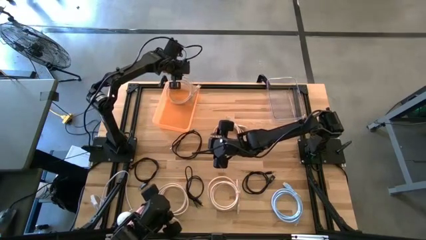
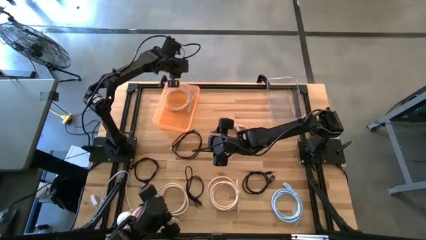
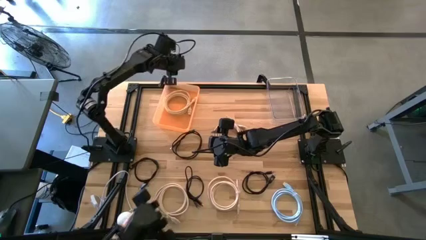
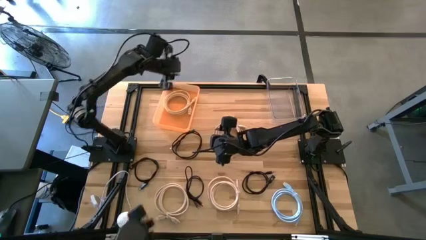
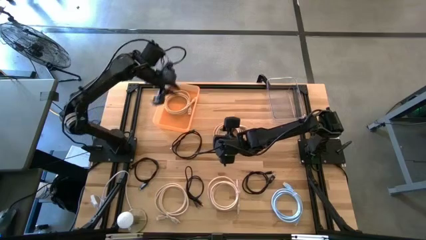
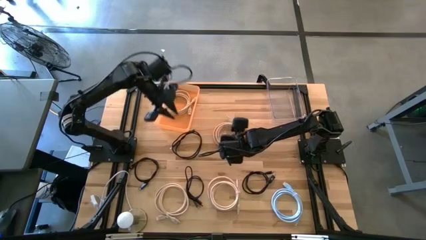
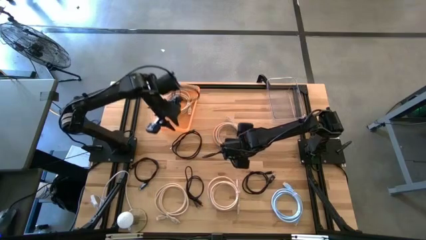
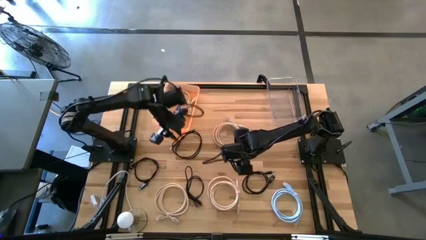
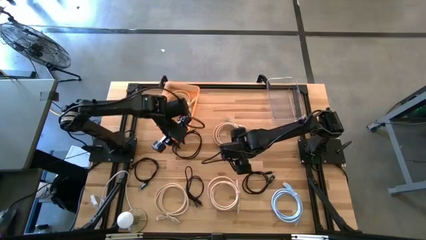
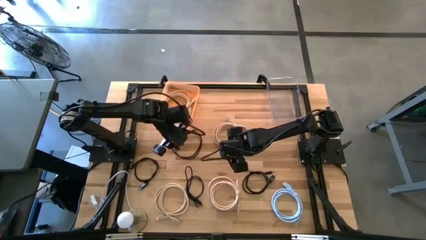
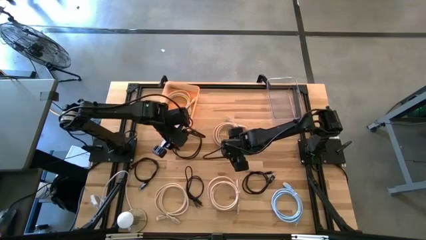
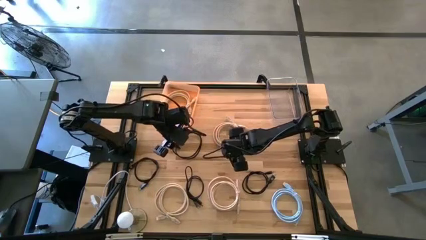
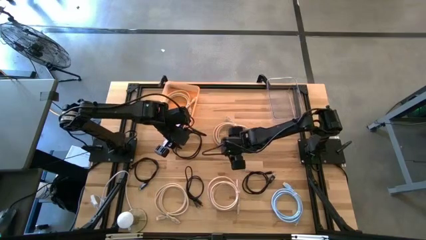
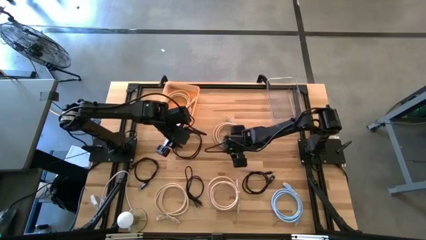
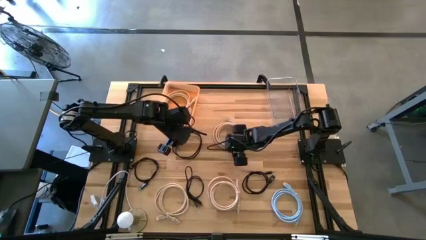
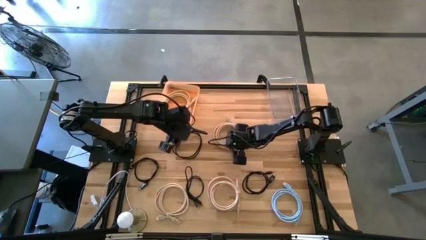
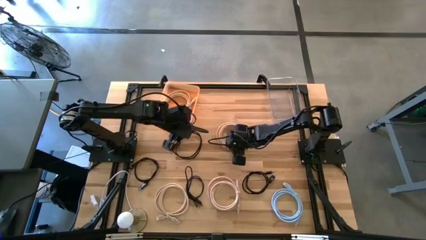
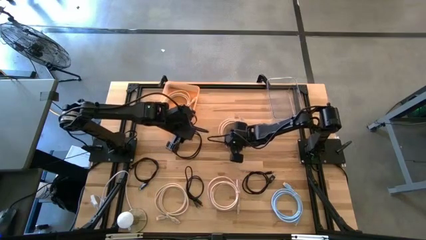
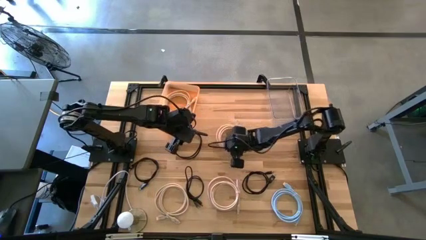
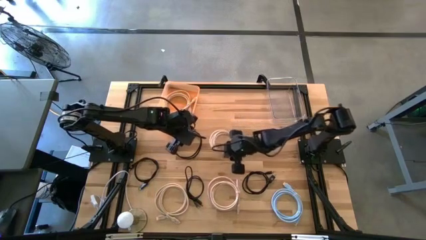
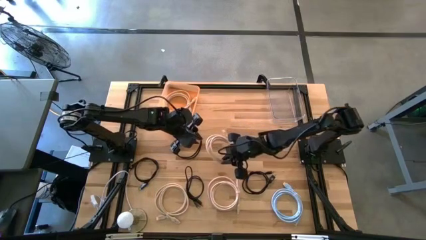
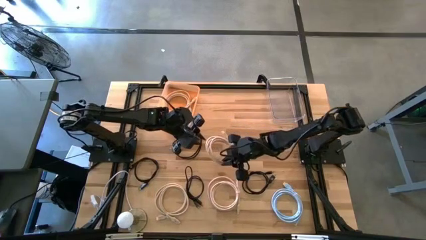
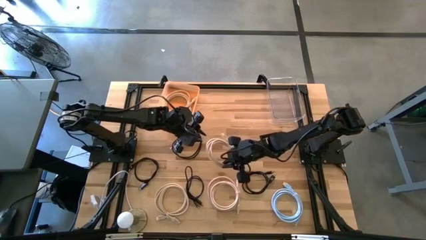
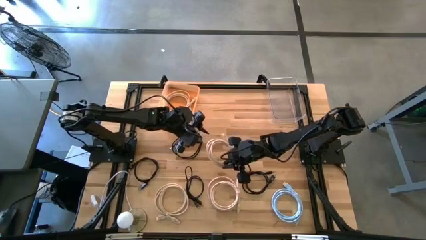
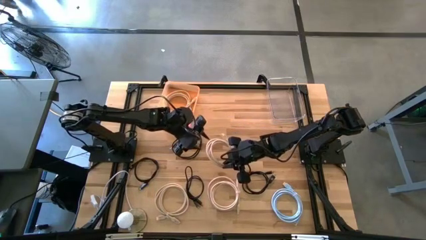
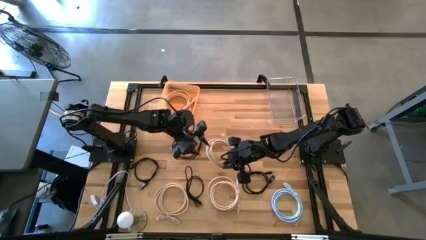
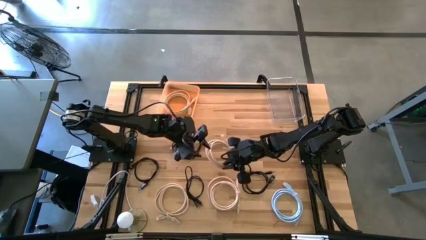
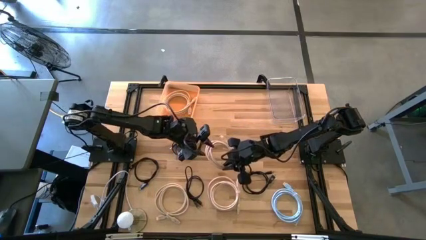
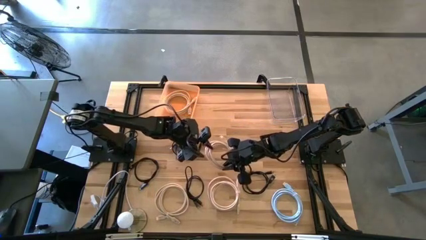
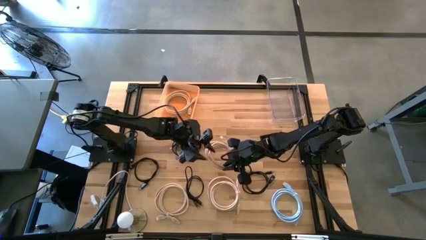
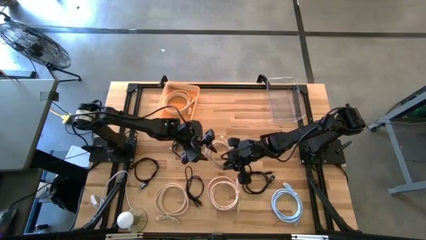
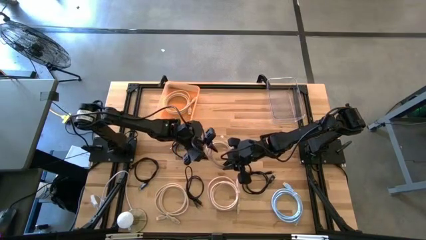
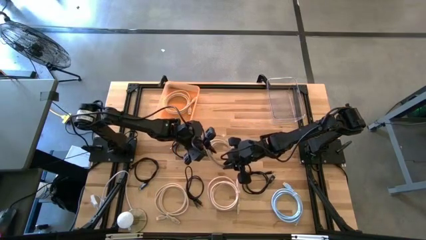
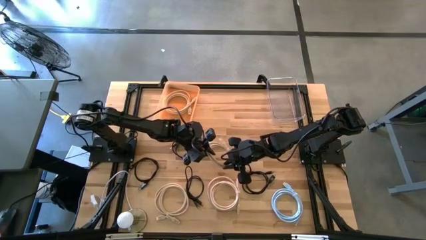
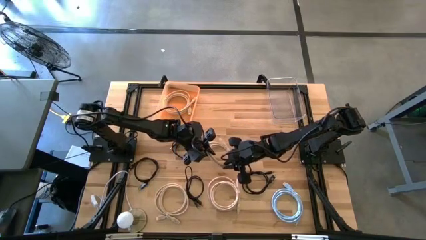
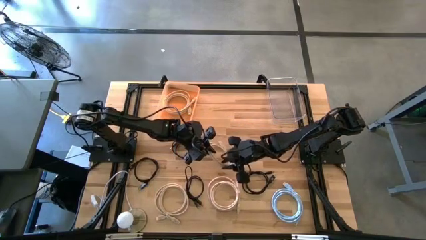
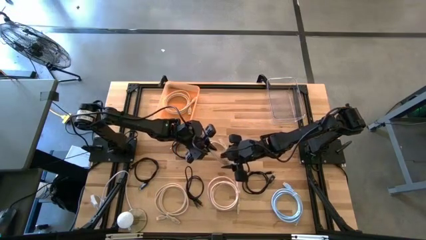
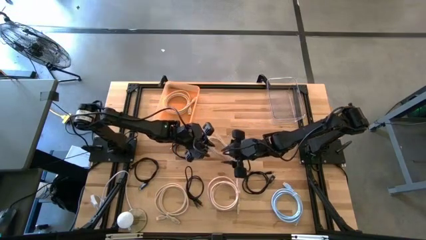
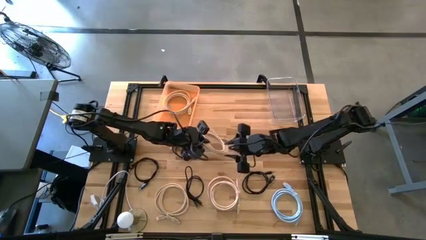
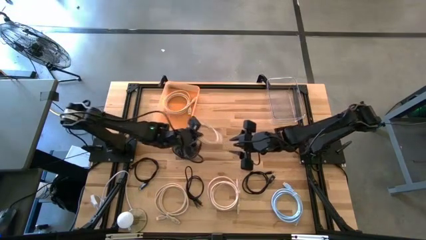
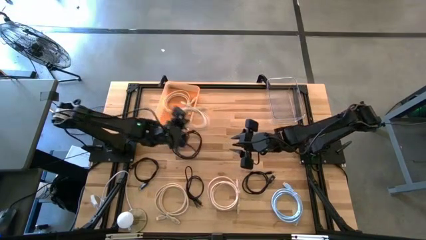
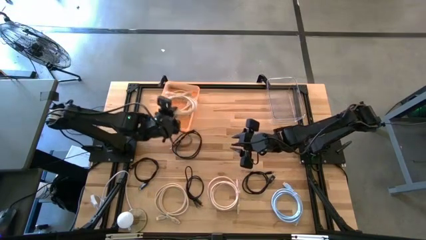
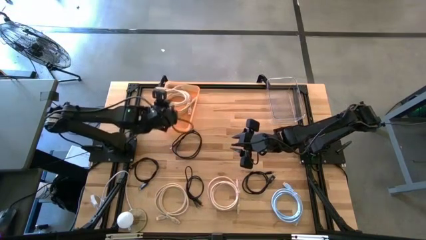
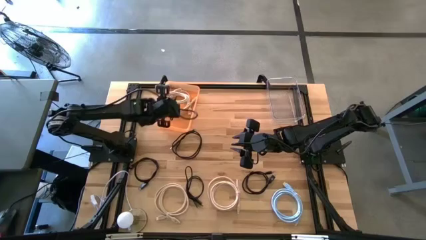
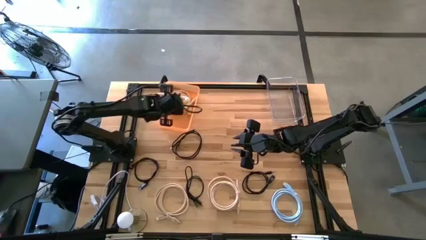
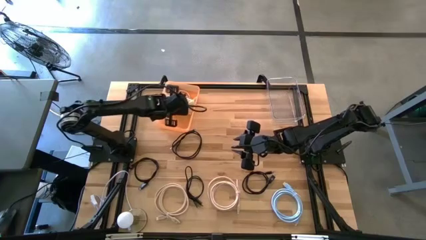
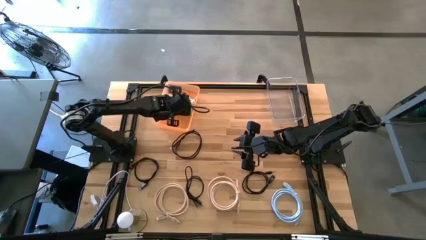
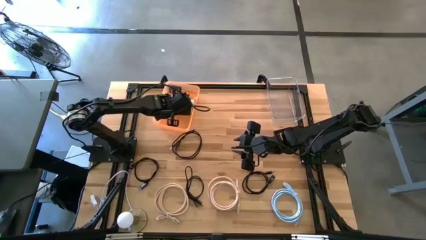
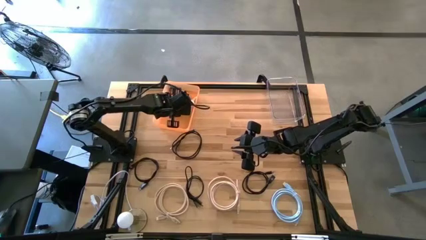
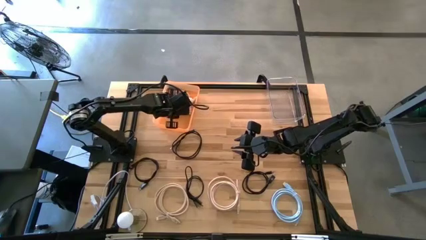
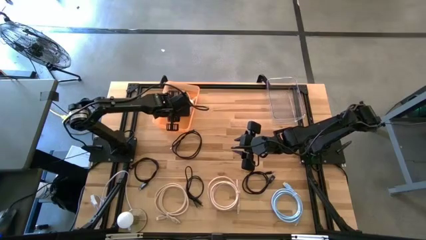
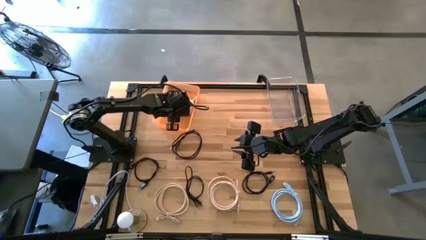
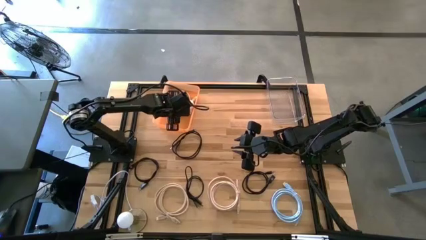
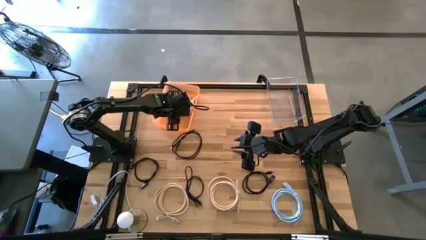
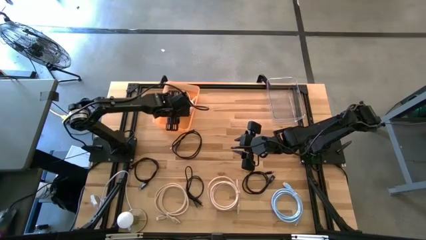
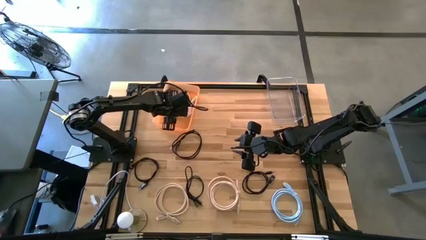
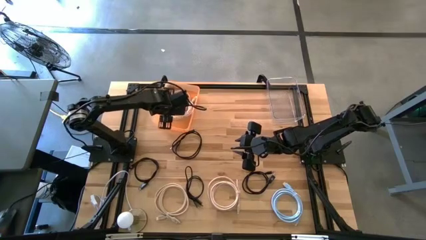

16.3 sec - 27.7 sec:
Task: Pick & Place USB Port
Put the light brown hdmi cable into the orange bin

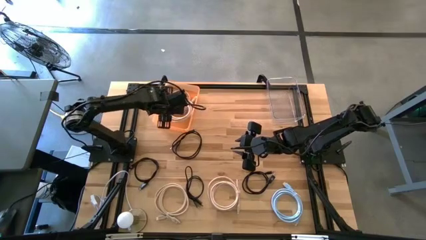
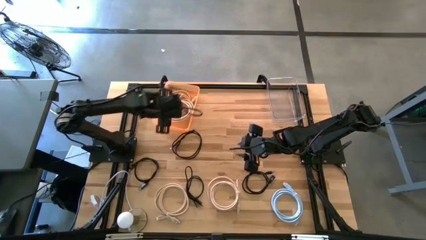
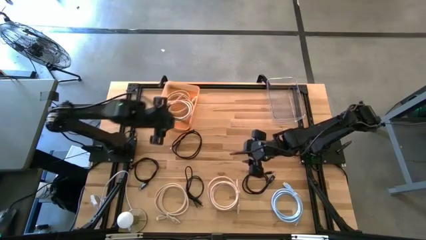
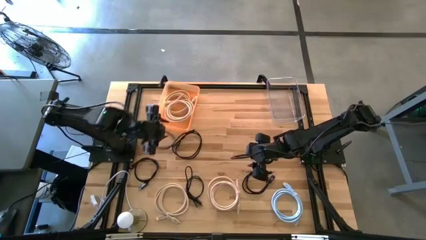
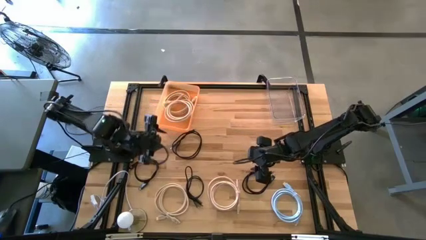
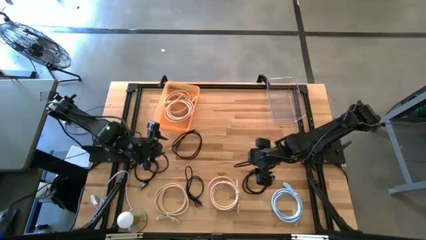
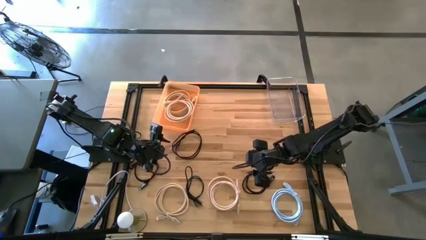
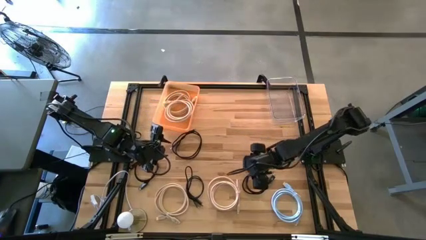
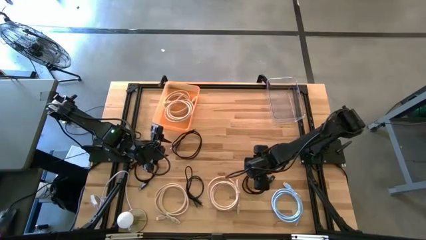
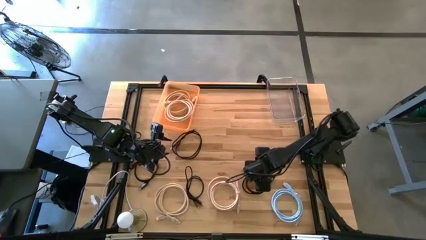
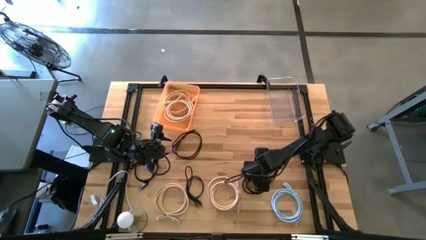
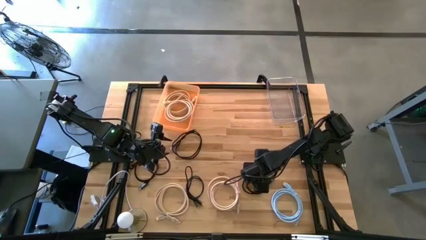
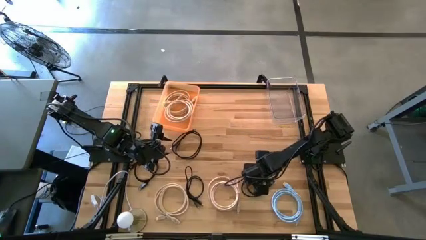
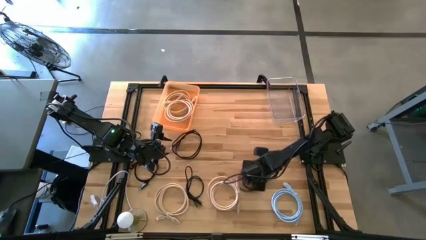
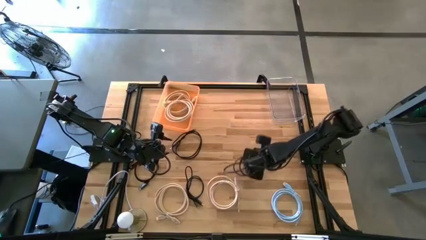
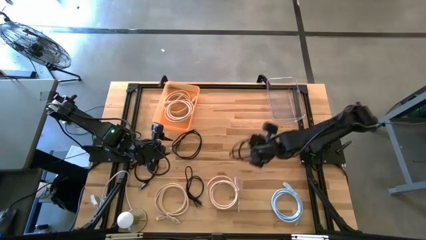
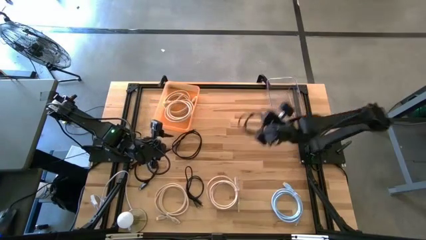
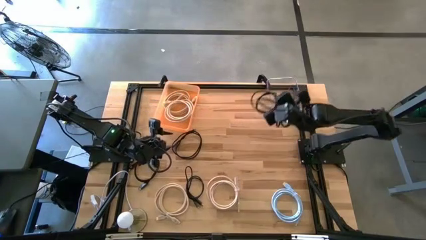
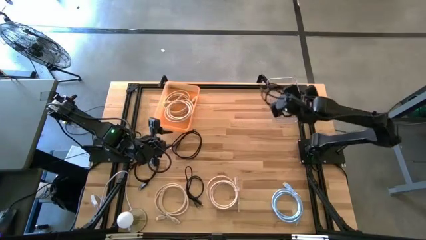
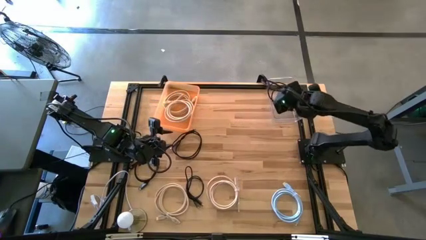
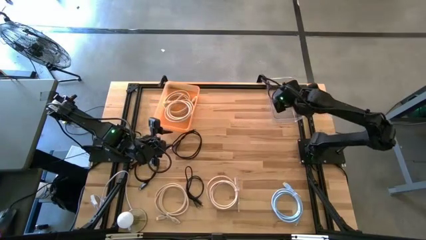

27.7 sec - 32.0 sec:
Put the black charger cable into the transparent bin

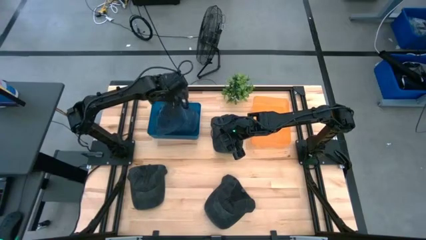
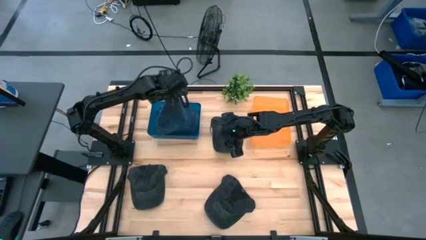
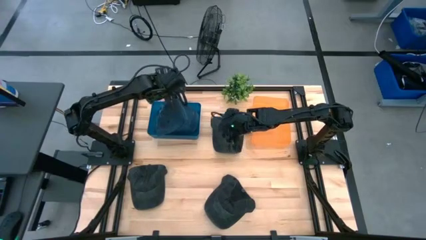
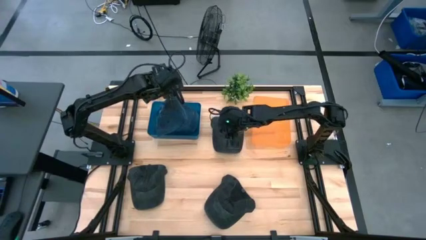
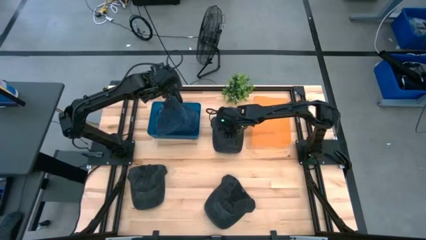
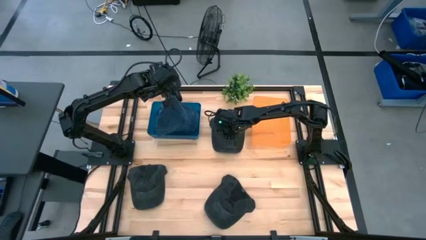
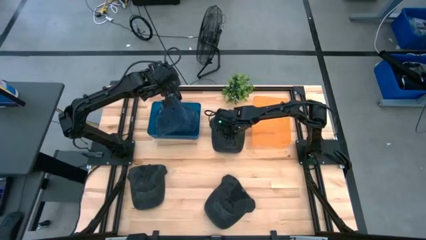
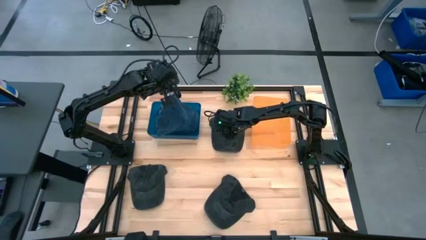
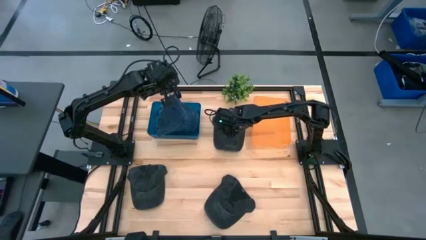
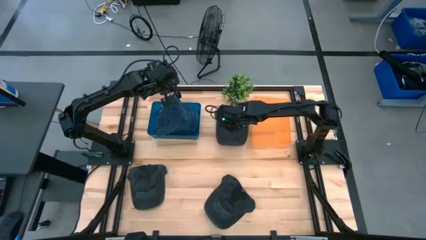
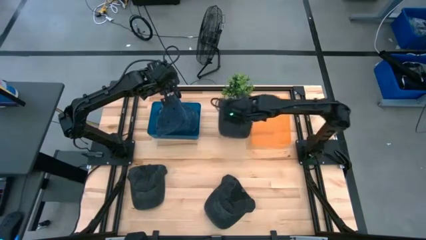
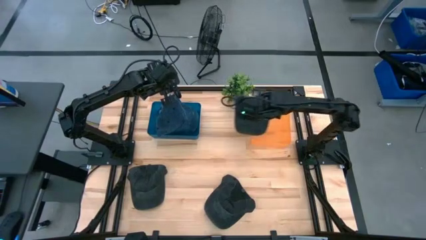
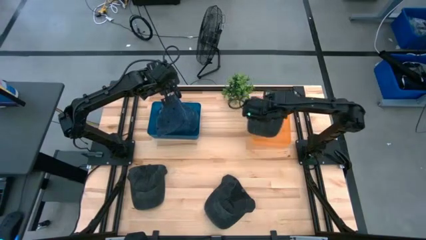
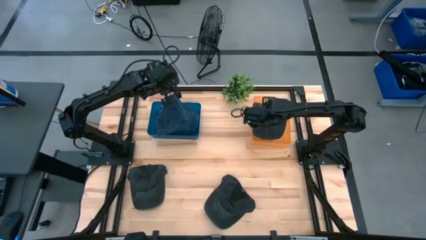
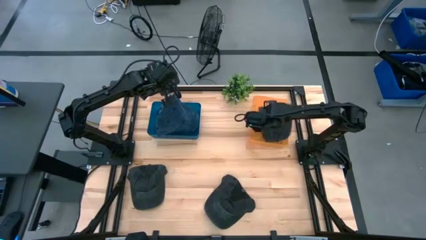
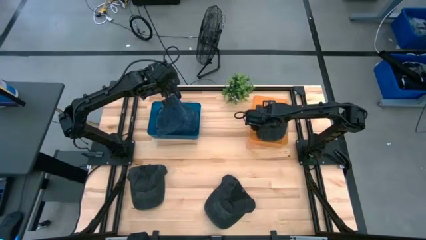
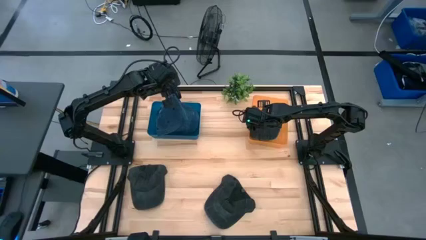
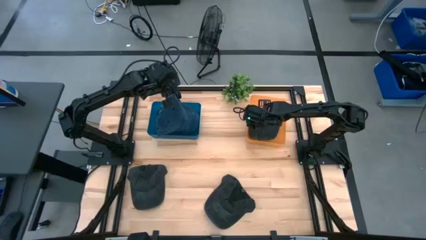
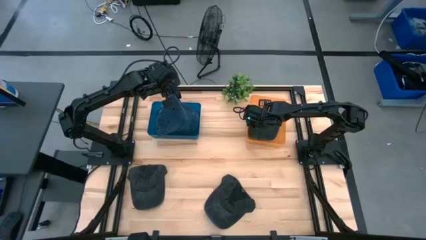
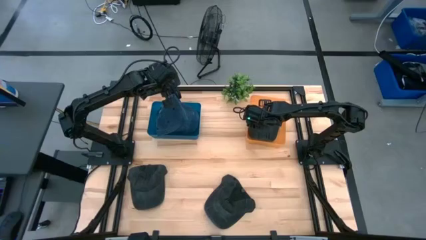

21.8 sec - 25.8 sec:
Task: Pick & Place hat
Put the top black cap into the orange bin
